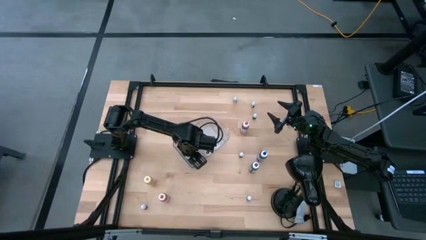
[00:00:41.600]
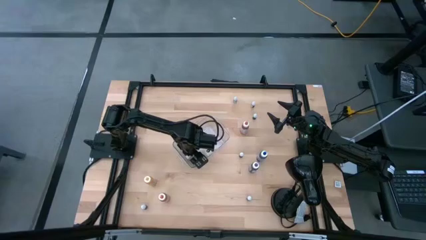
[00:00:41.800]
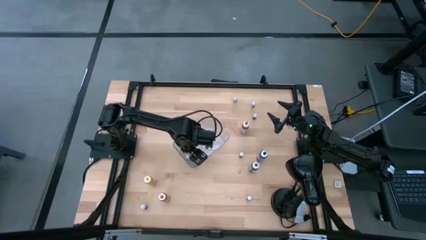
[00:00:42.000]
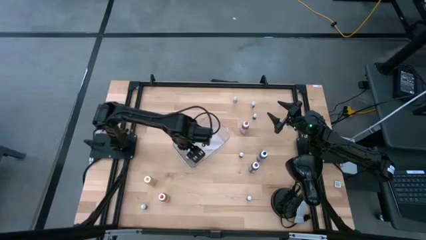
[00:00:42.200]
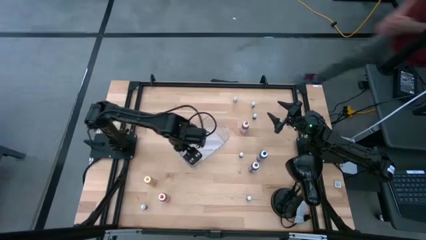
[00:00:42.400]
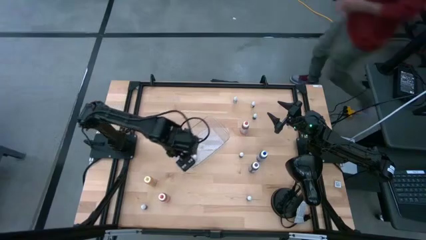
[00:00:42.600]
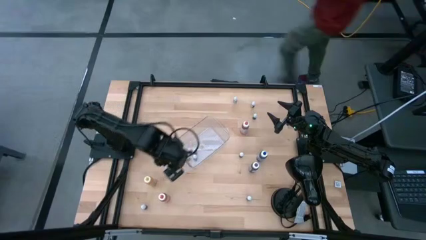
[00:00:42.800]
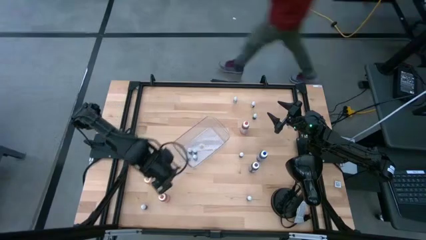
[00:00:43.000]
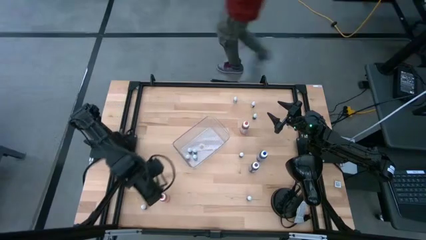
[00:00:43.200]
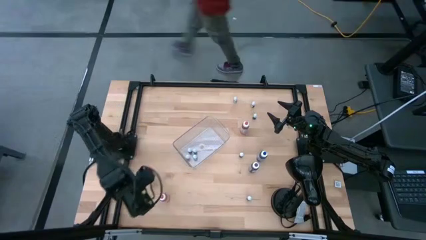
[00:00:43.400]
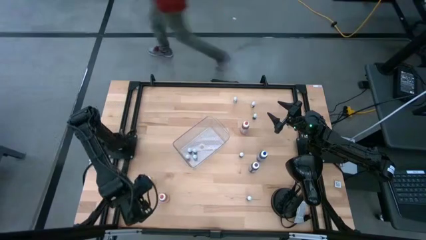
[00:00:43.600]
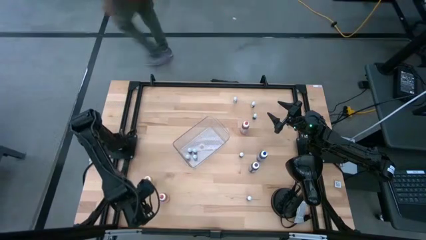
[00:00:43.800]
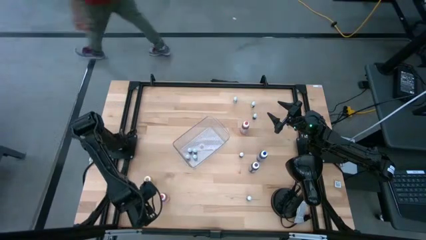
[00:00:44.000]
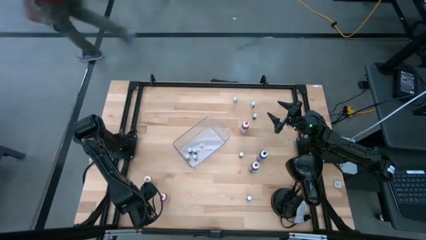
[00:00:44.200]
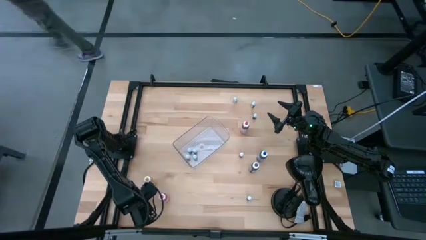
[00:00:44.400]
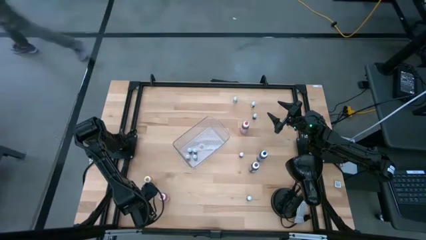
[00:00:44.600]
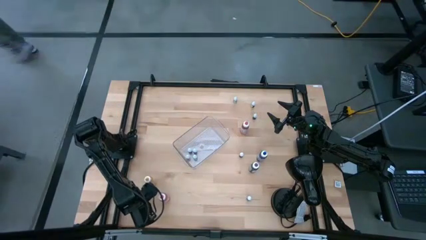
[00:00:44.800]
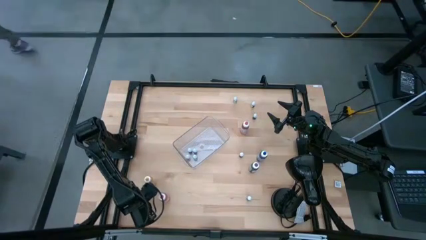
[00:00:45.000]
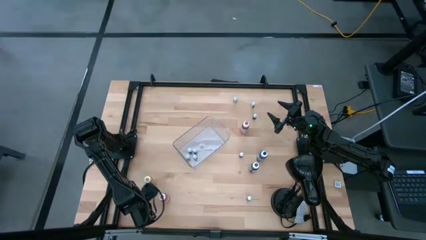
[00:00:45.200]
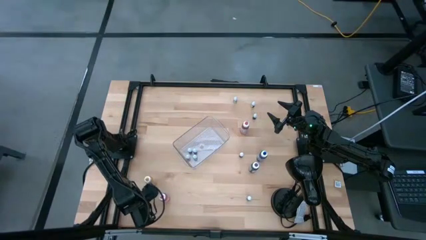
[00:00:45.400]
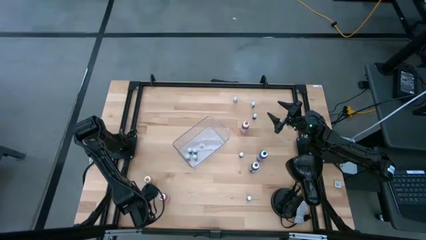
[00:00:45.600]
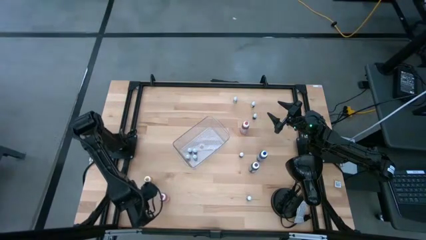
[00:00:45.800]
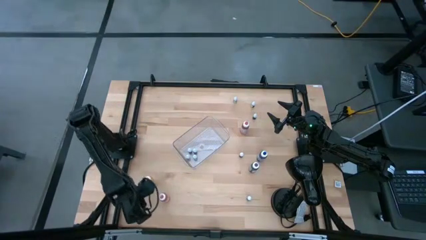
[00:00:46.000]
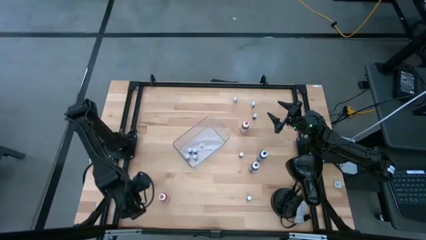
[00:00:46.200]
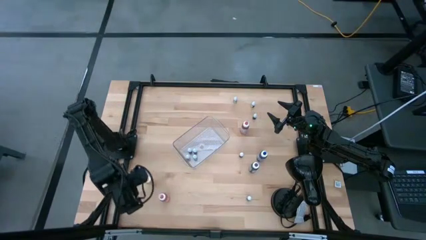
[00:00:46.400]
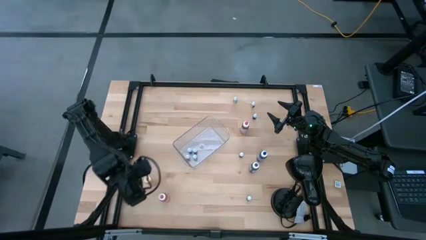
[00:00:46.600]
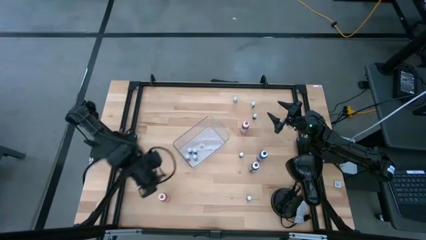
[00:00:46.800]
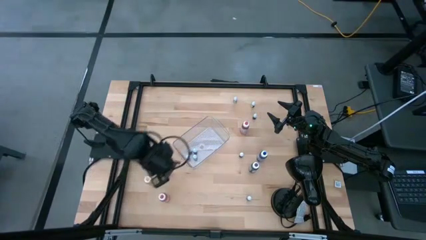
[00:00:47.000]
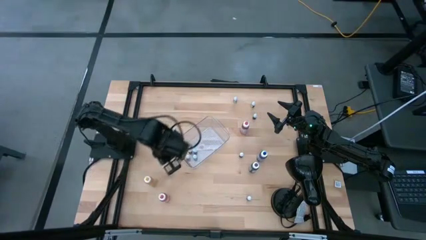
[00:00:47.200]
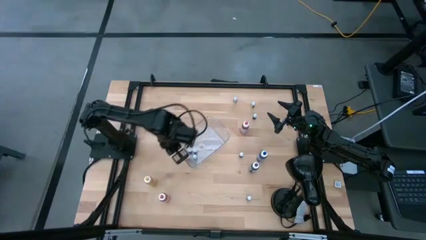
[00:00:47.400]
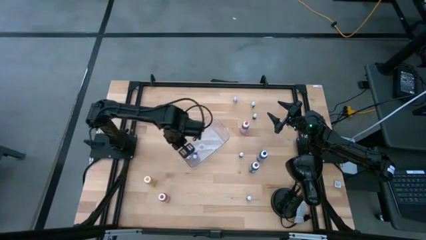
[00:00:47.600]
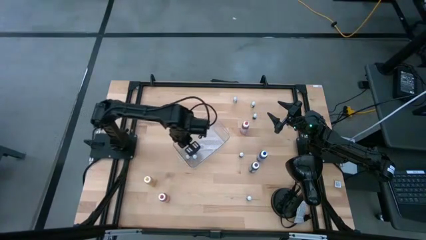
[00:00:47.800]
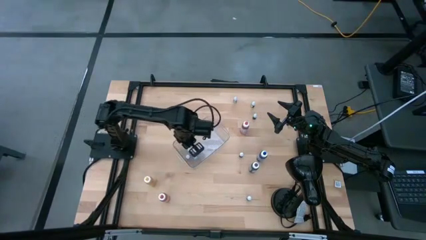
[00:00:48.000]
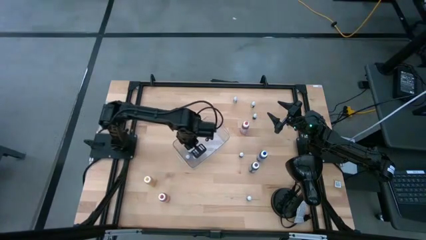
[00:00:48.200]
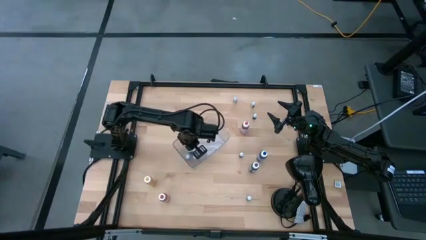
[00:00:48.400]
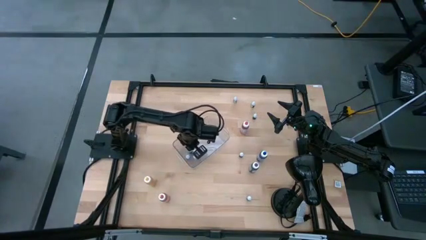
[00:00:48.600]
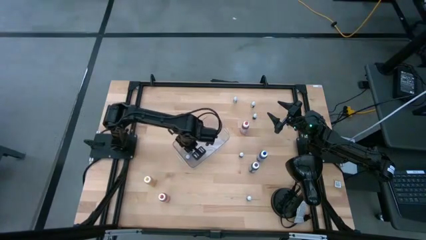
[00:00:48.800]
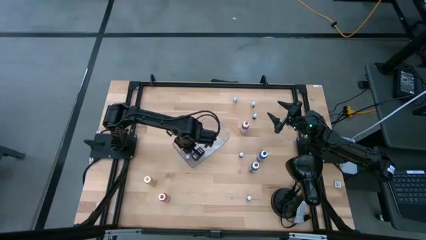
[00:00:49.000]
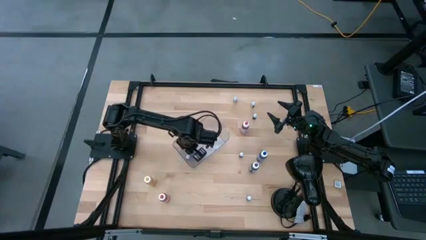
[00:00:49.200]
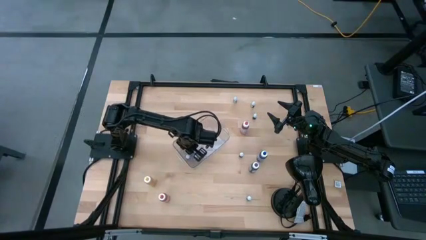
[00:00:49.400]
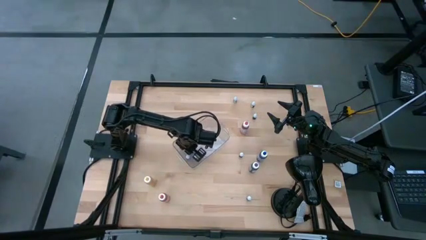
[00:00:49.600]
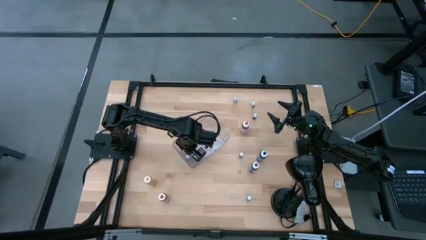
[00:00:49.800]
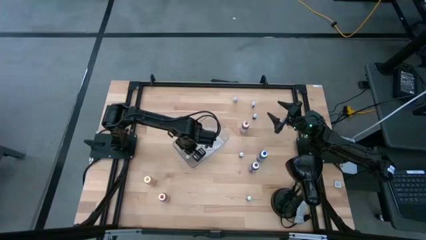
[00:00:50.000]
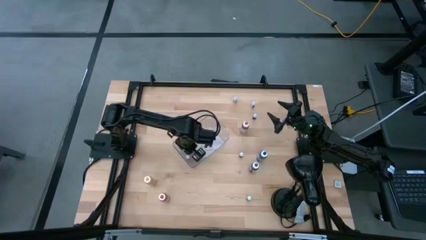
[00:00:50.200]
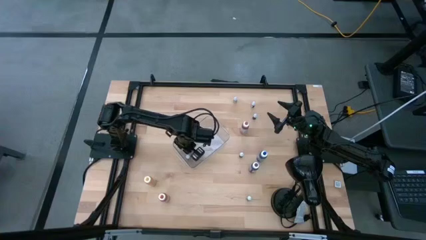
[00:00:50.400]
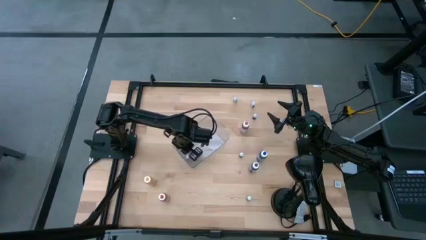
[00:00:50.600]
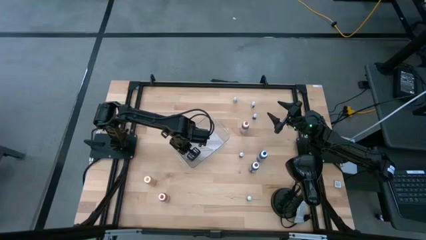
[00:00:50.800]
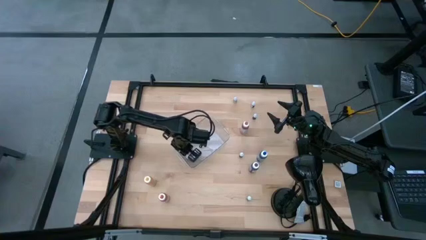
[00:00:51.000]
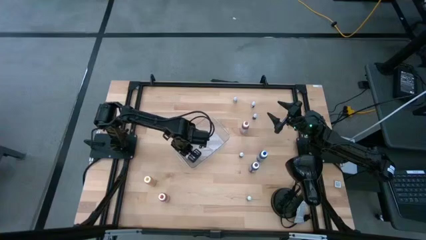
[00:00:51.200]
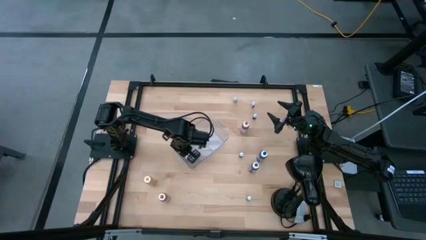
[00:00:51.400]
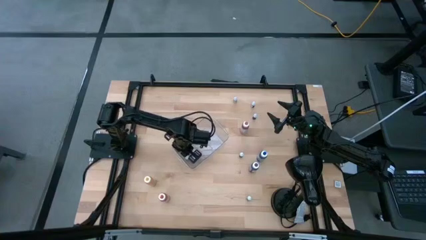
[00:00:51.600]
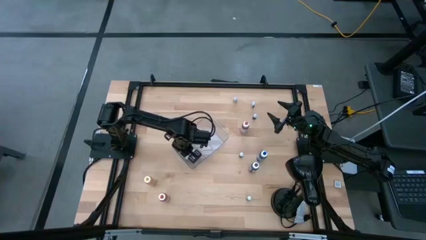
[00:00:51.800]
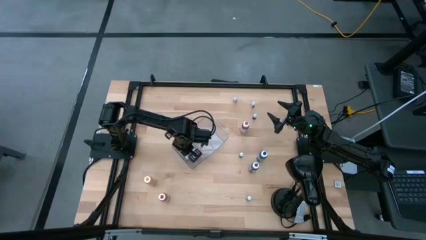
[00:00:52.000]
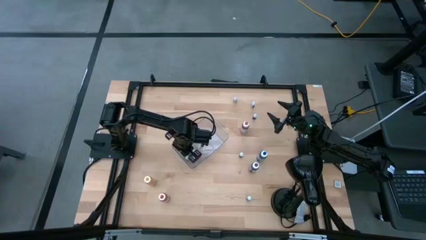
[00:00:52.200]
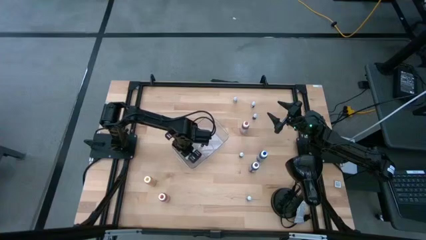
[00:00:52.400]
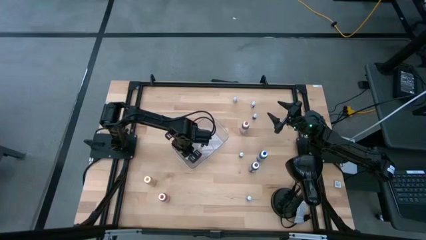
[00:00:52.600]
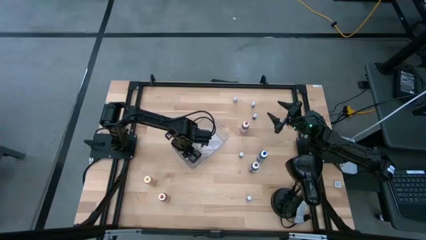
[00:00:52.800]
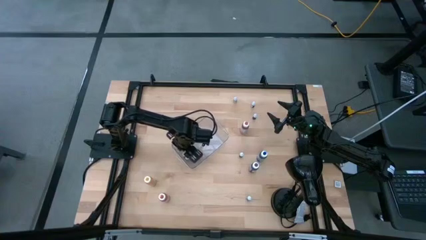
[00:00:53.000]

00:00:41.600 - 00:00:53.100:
Task: Pick & Place food coloring
Put the small green food coloring bottle into the transparent bin

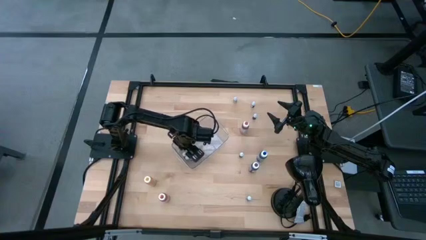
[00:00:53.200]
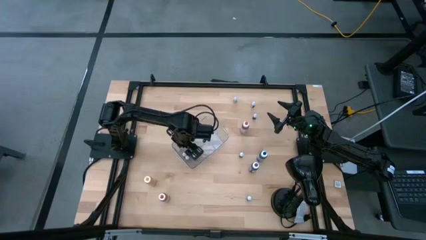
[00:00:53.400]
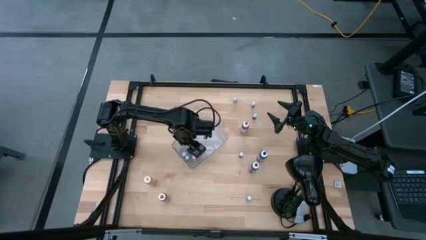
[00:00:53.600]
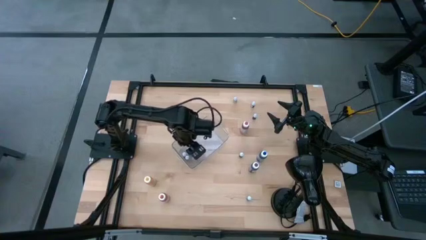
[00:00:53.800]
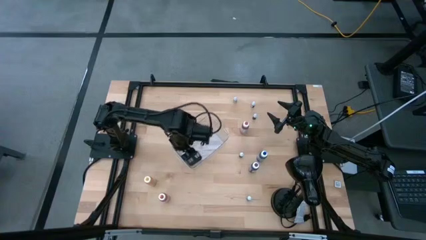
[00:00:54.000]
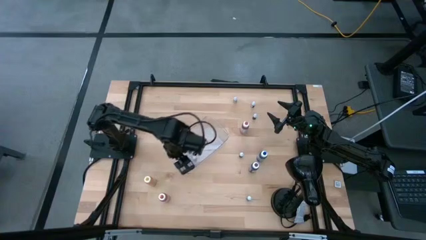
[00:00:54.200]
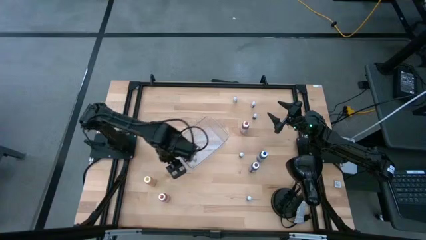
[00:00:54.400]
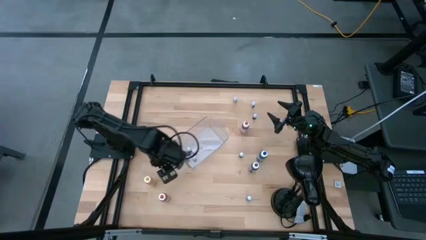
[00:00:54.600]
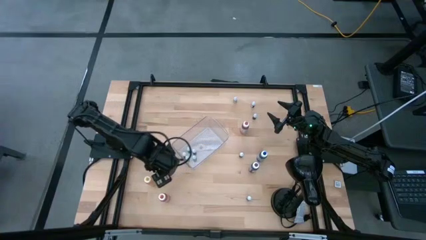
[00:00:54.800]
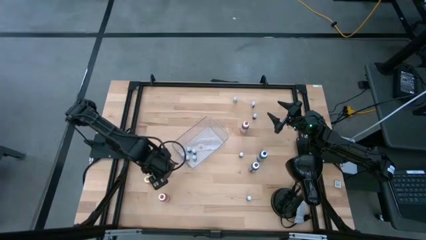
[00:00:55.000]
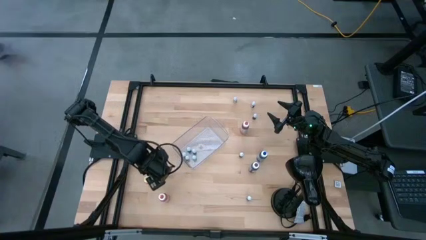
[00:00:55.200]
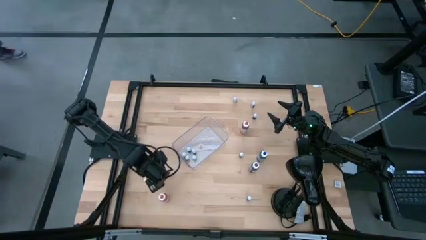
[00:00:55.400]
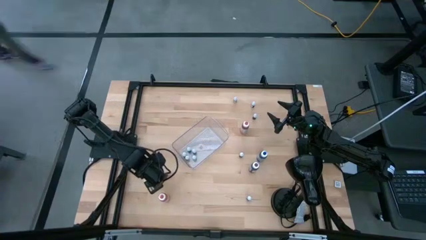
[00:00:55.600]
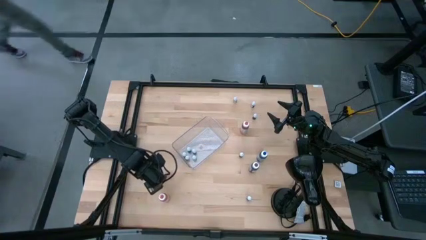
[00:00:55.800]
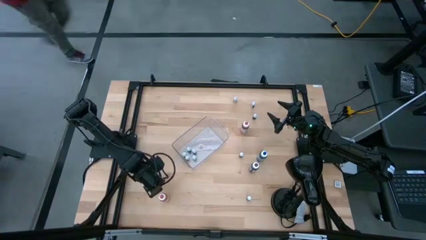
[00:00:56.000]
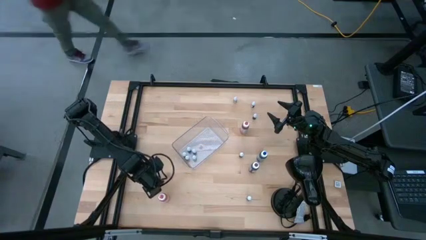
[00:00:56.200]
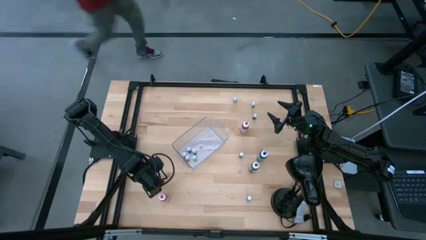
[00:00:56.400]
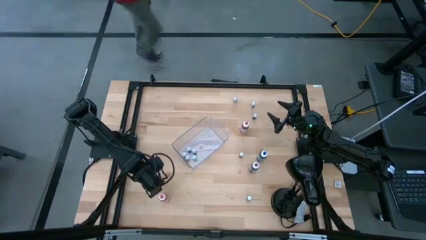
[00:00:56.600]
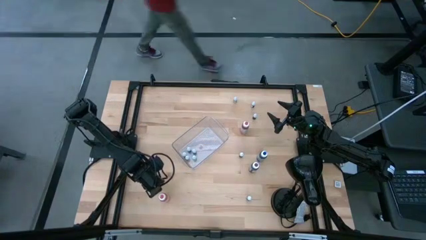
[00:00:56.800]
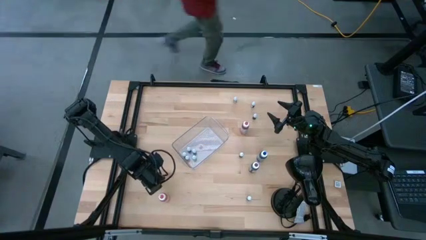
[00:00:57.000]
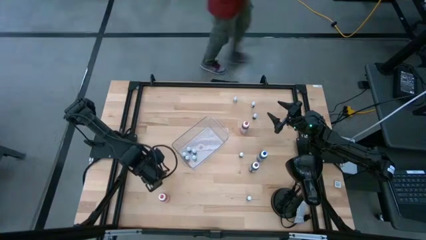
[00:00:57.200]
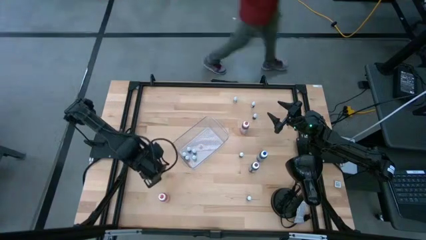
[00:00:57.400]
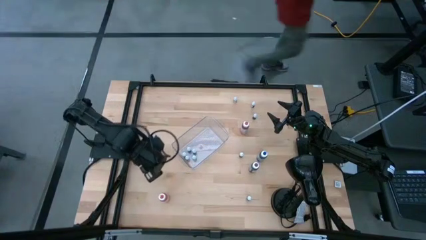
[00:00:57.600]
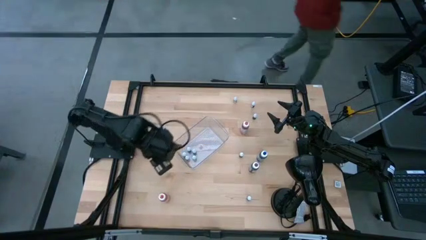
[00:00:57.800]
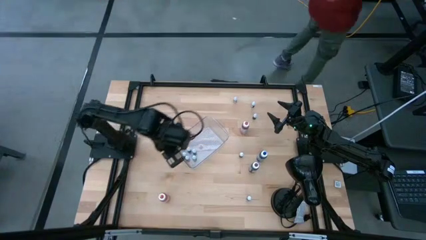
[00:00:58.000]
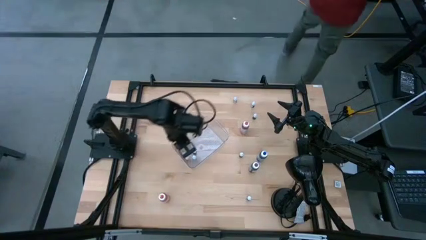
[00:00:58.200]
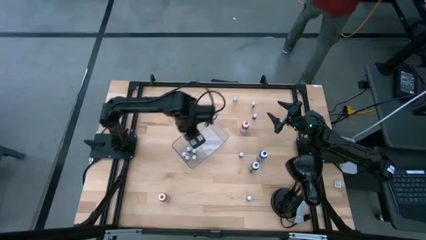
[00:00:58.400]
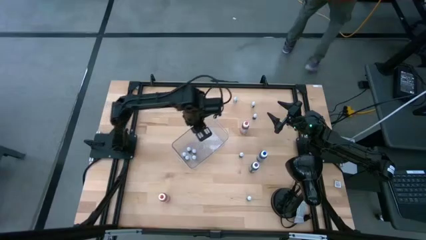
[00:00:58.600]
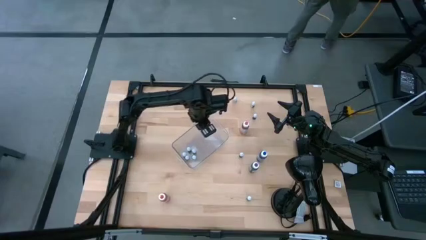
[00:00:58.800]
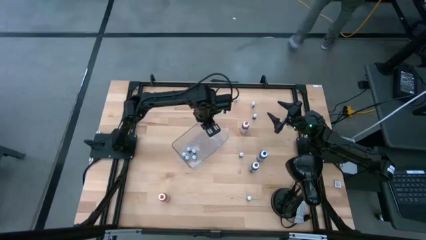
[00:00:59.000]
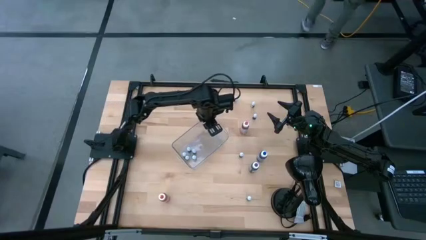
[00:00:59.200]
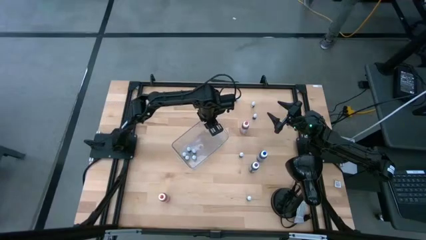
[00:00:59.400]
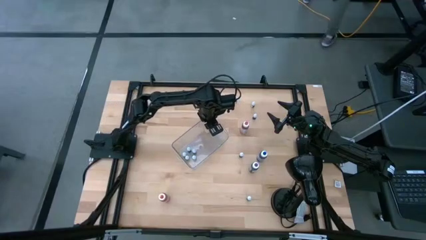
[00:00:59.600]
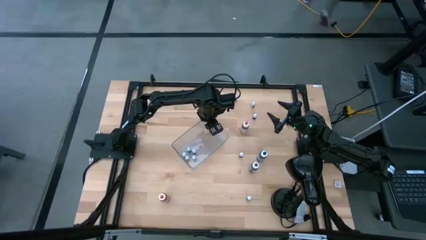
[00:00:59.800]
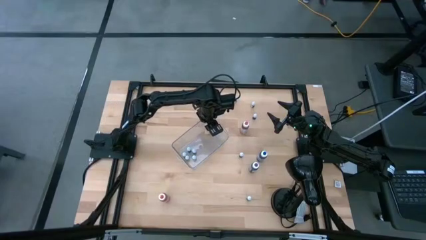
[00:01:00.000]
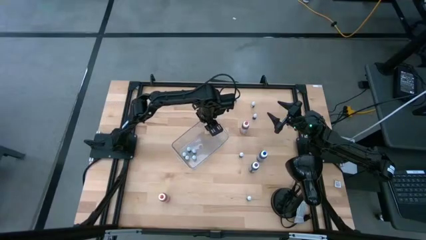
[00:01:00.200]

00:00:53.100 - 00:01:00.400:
Put the large yellow food coloring bottle into the transparent bin
